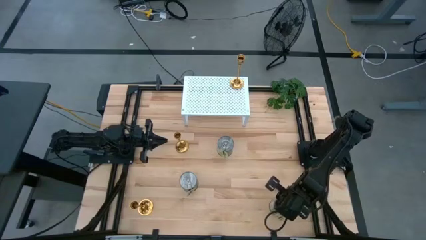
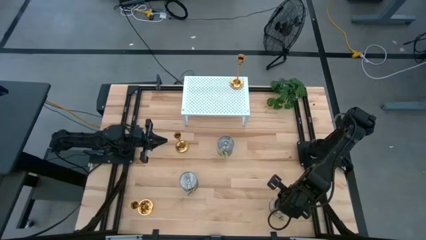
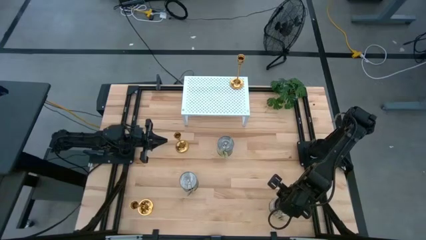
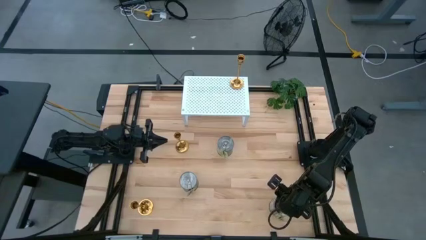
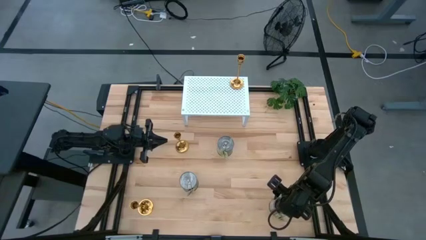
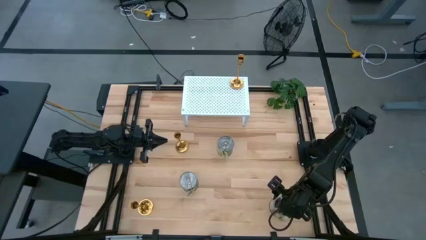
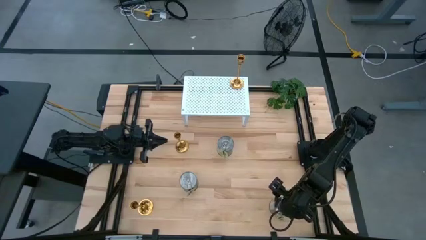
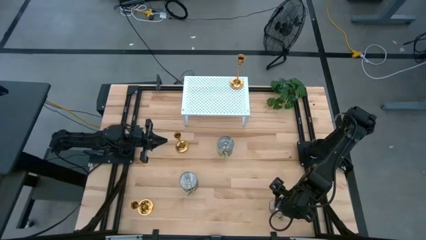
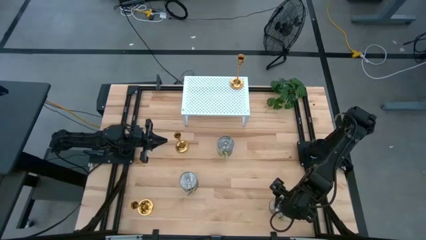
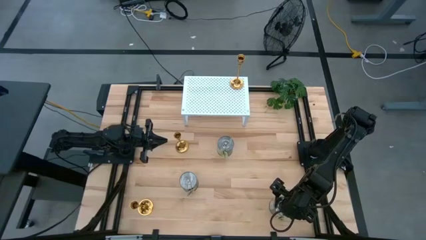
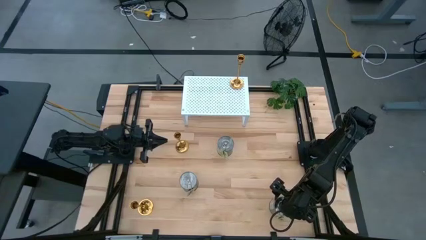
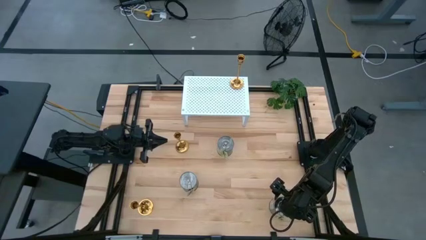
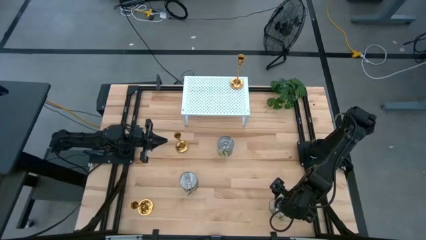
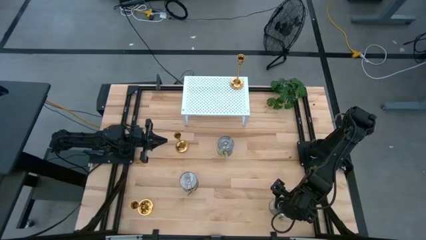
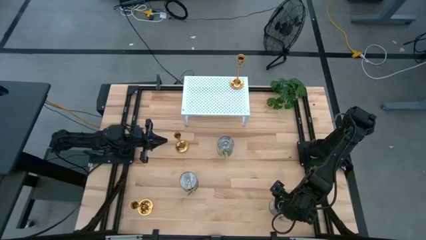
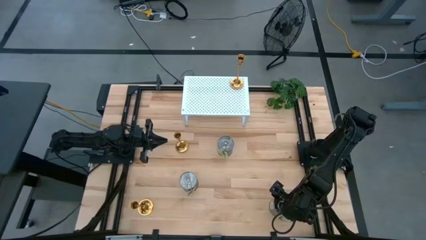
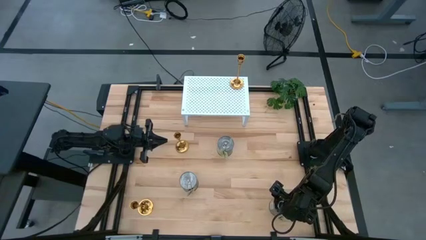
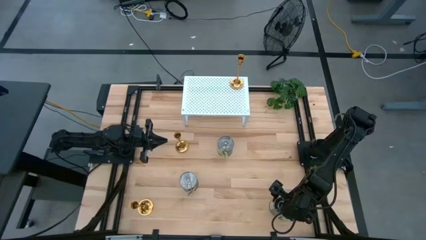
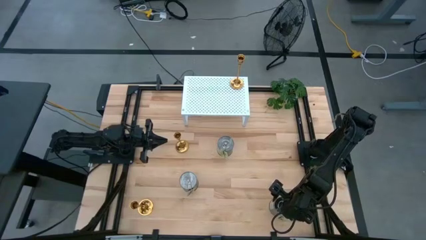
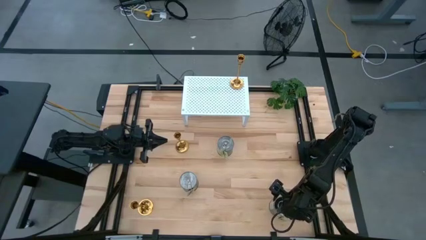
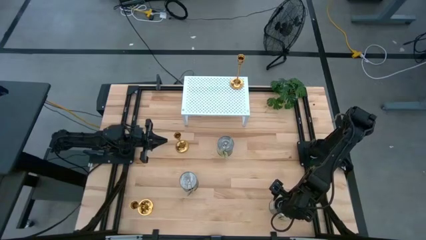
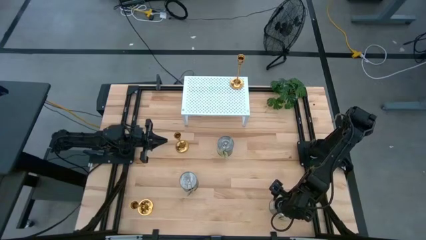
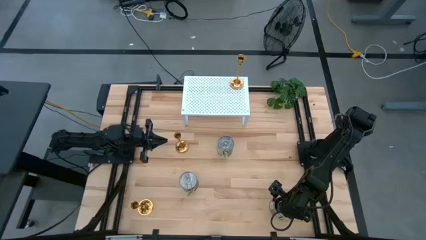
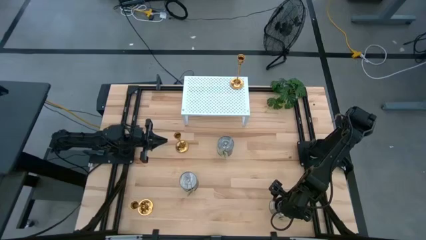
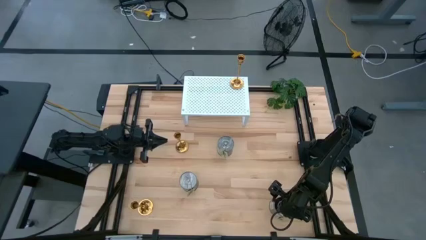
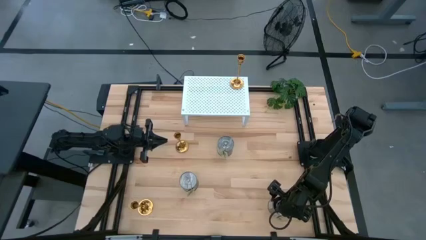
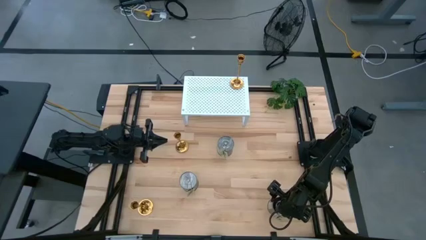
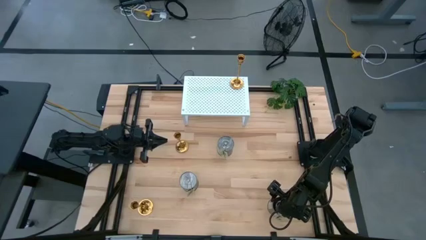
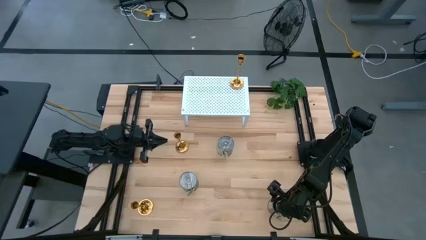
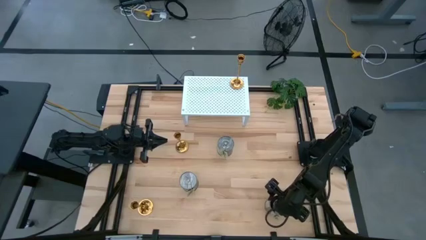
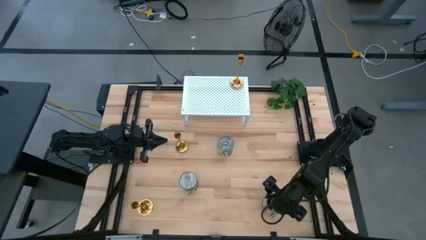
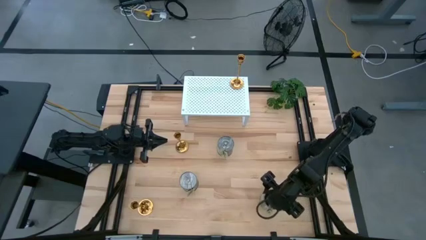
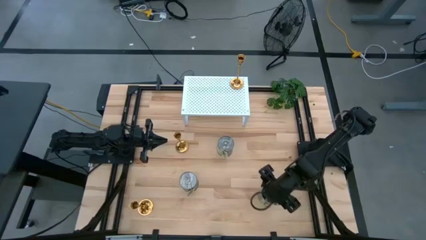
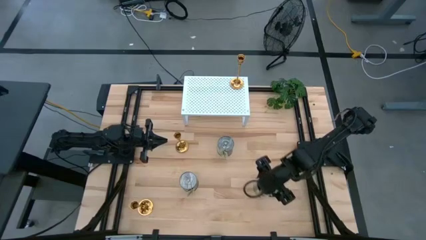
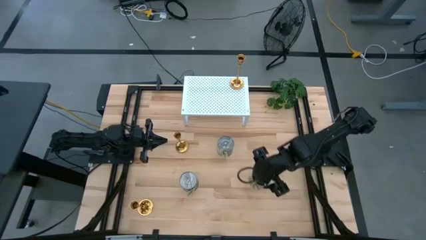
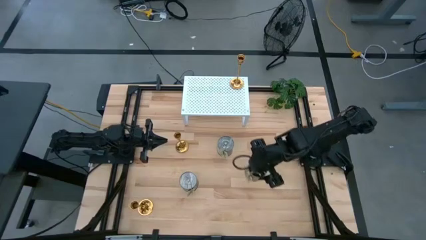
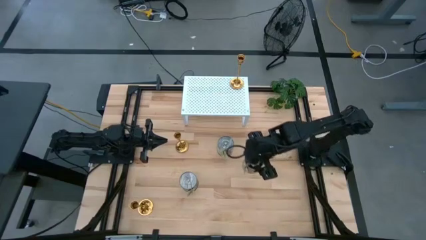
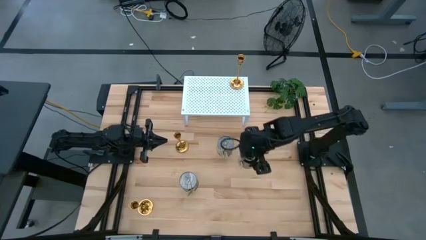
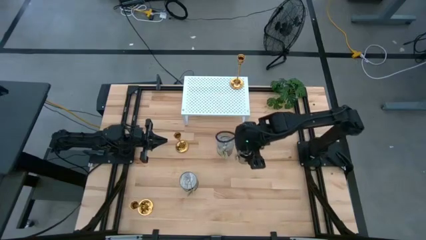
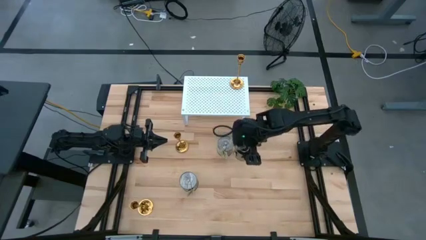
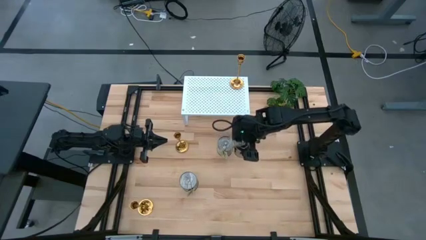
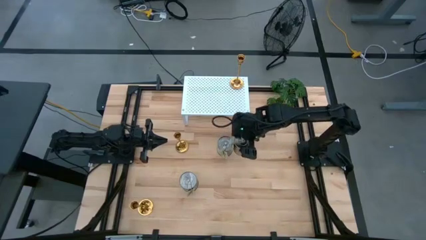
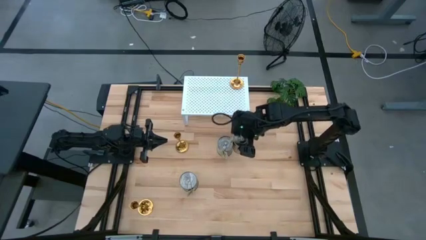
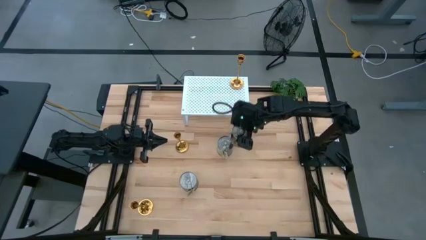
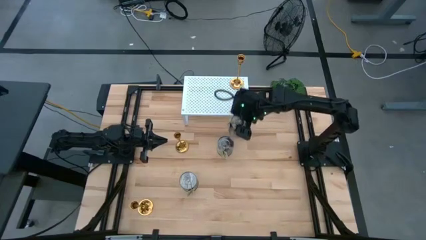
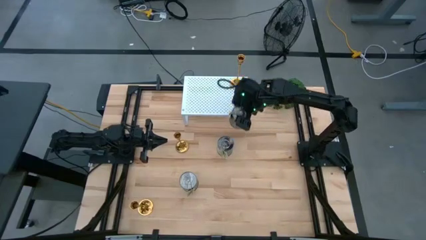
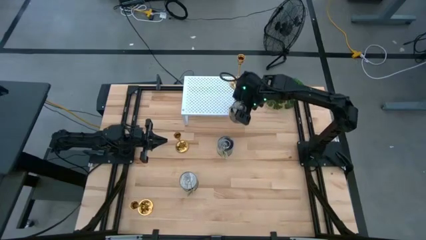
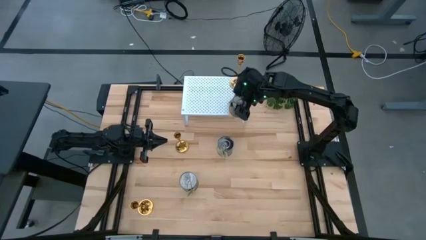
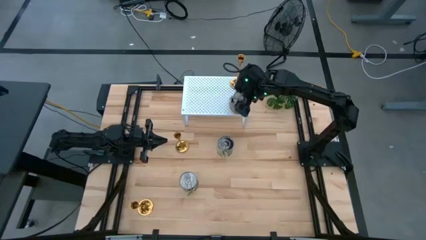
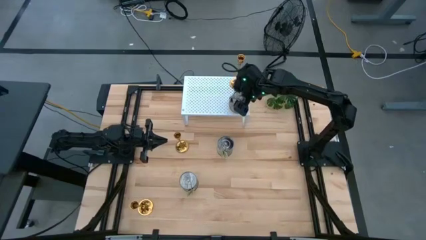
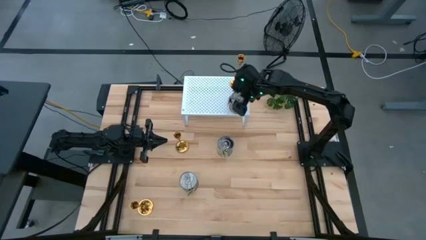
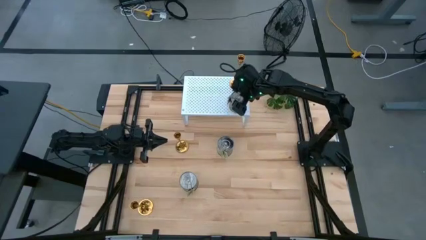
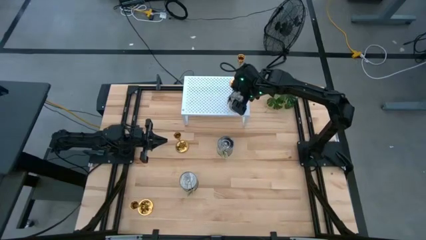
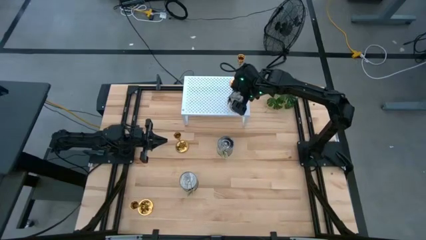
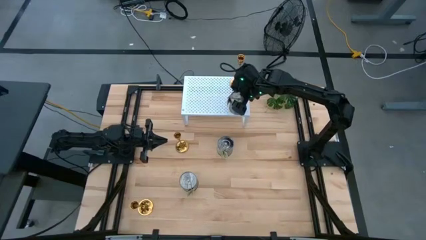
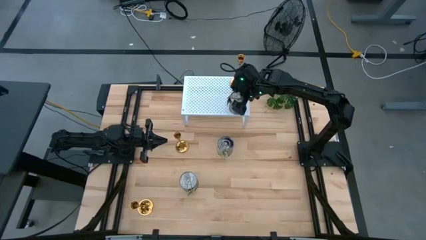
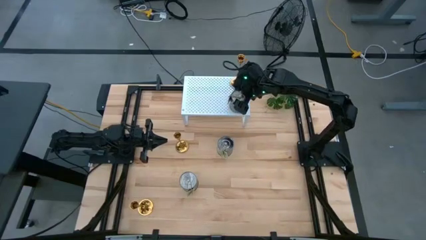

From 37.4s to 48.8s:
Task: Pick & Place candle stick holders
Put the right scented candle can on the shelf
